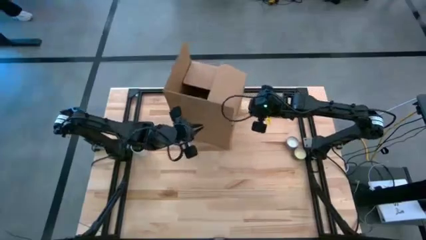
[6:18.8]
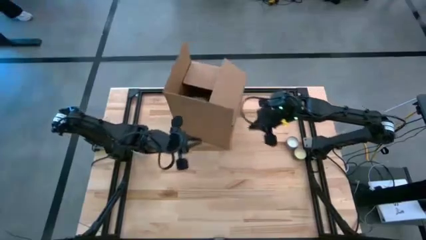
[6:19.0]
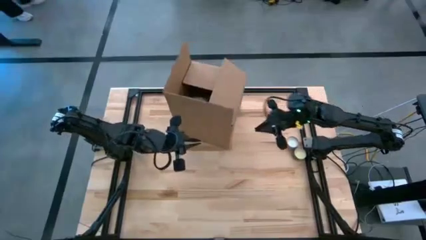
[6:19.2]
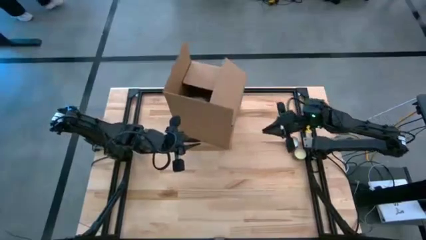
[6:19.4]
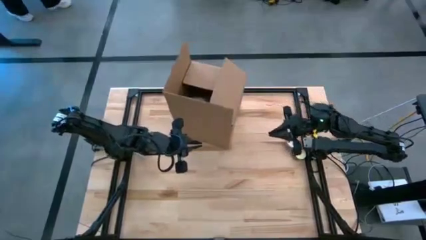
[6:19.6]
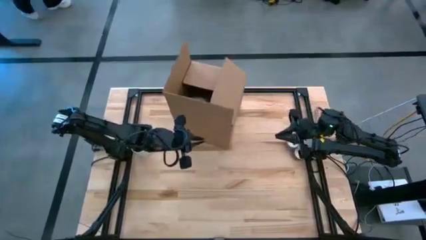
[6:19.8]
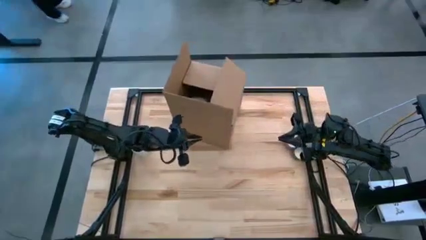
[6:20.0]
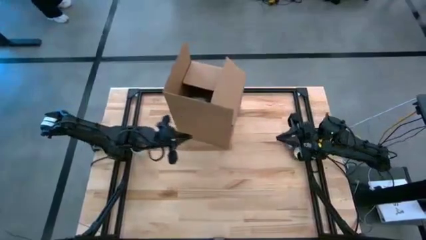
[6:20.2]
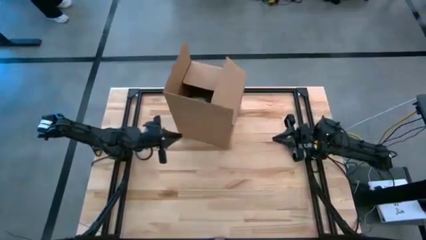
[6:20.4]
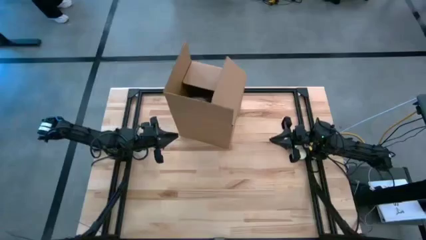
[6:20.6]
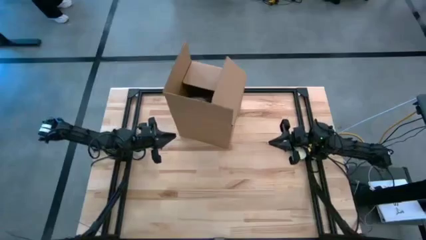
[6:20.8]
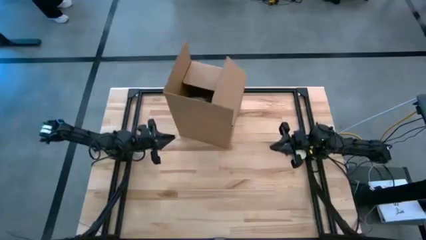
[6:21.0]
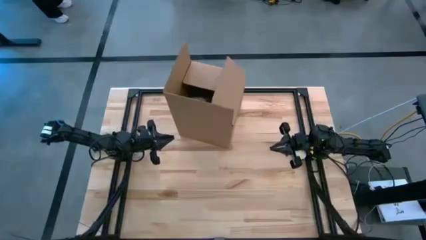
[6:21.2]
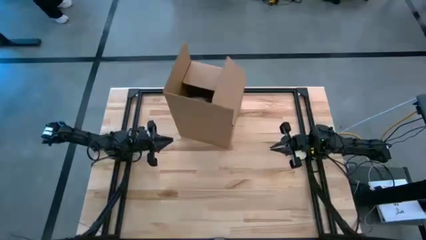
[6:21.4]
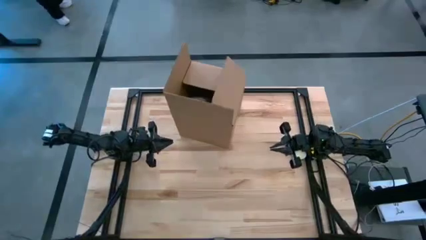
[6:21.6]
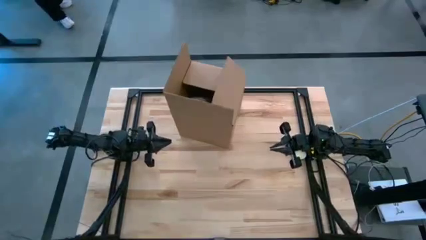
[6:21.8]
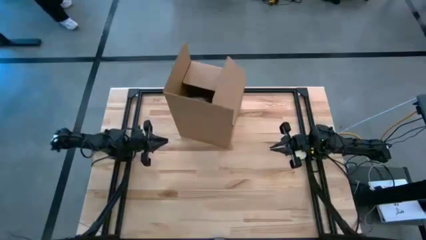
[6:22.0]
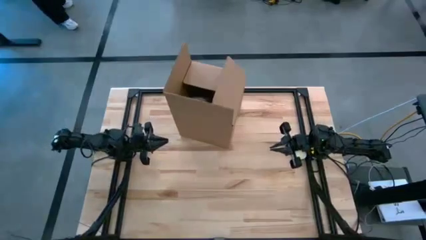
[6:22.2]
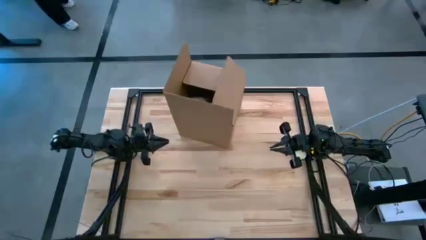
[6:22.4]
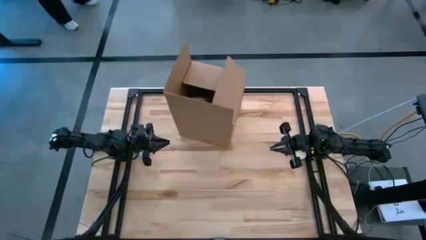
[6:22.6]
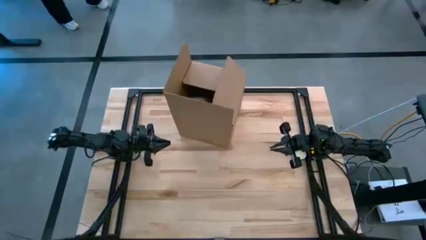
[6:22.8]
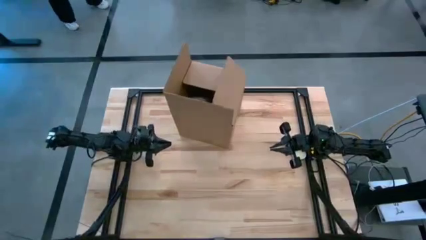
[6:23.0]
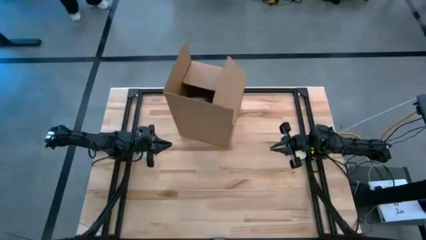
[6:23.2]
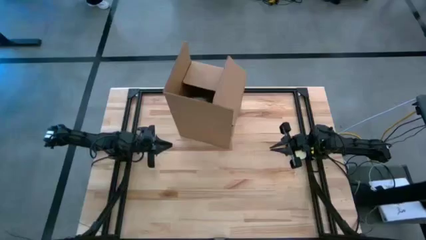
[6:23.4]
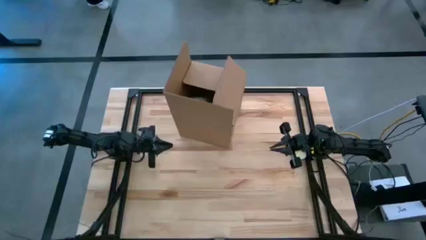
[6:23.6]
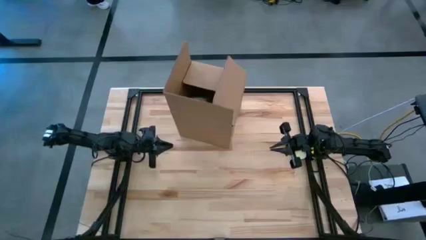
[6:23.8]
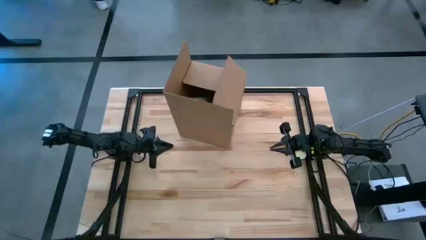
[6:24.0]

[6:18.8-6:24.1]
Task: wrap mug
Return to Home Position

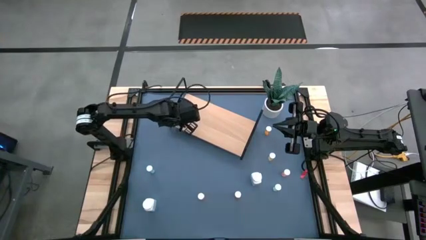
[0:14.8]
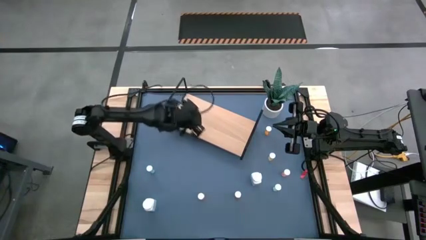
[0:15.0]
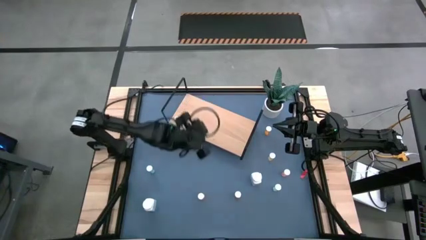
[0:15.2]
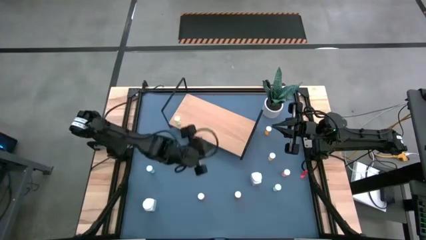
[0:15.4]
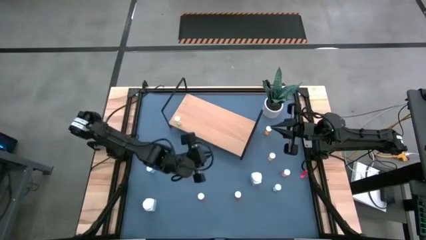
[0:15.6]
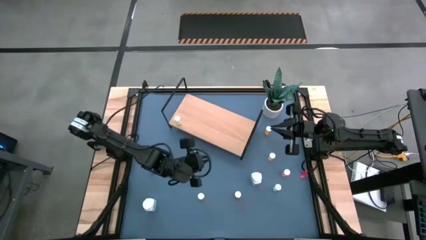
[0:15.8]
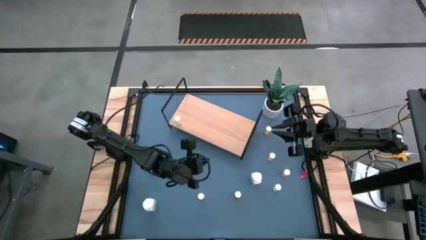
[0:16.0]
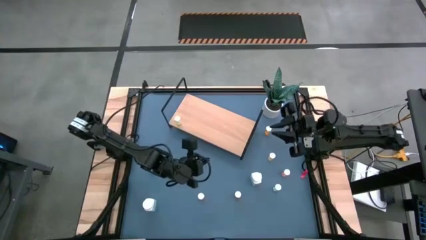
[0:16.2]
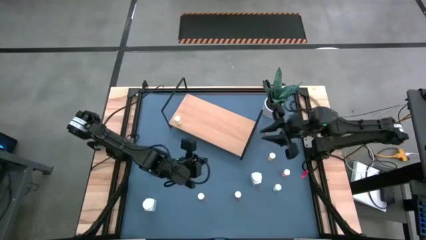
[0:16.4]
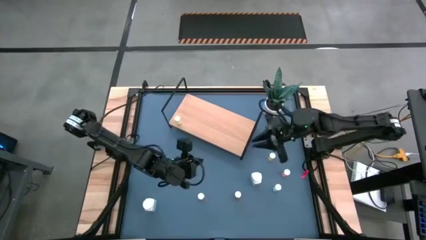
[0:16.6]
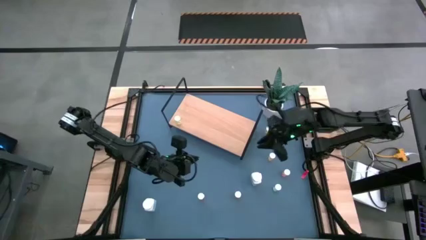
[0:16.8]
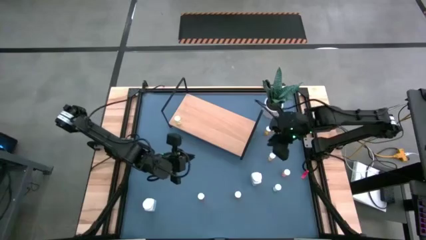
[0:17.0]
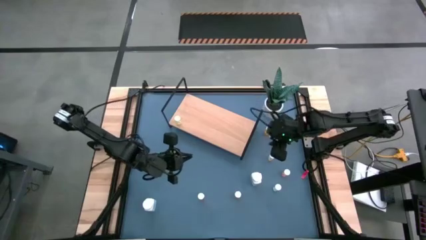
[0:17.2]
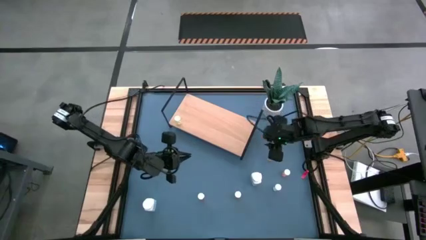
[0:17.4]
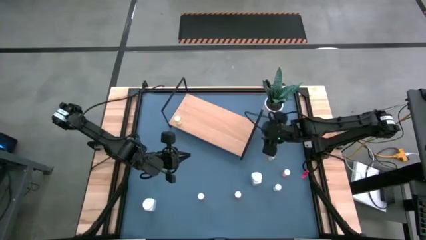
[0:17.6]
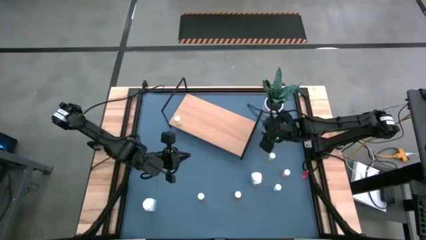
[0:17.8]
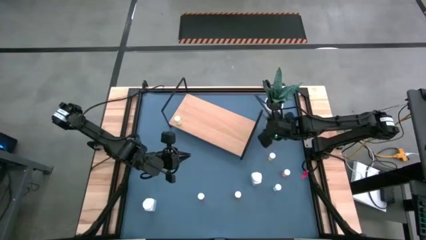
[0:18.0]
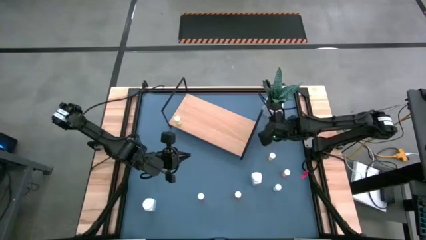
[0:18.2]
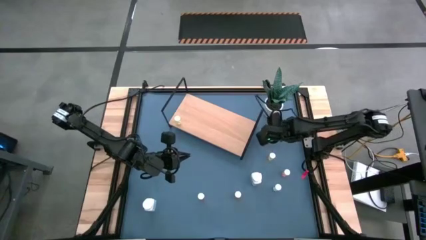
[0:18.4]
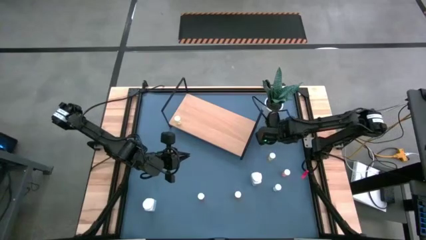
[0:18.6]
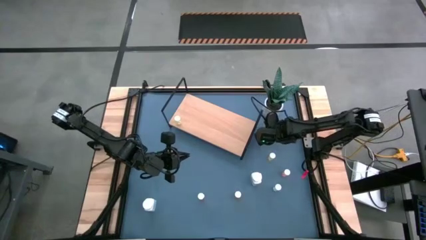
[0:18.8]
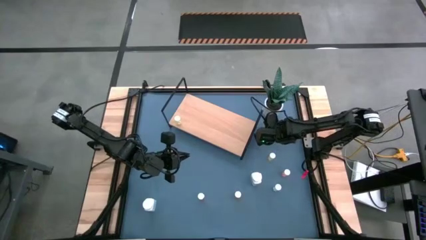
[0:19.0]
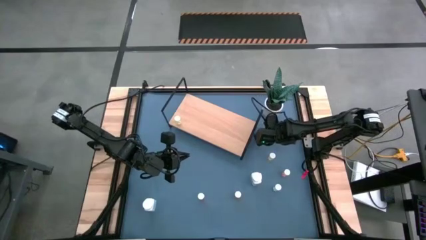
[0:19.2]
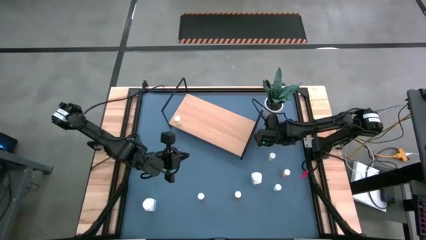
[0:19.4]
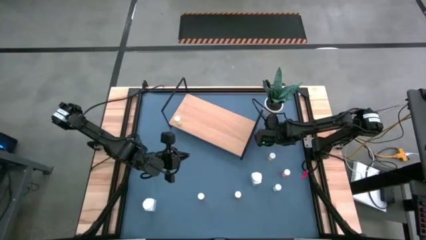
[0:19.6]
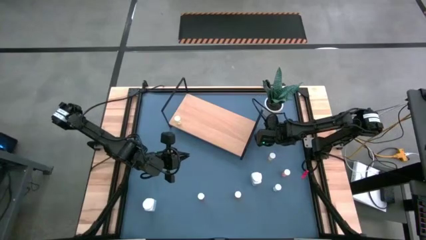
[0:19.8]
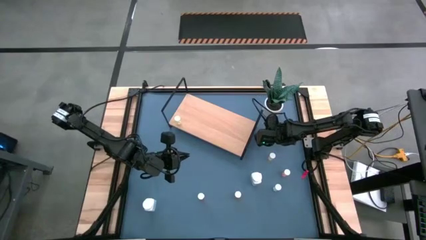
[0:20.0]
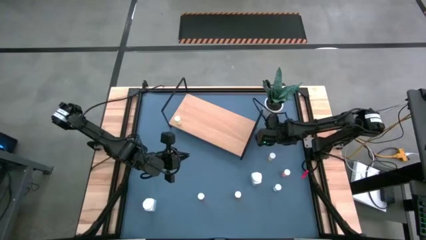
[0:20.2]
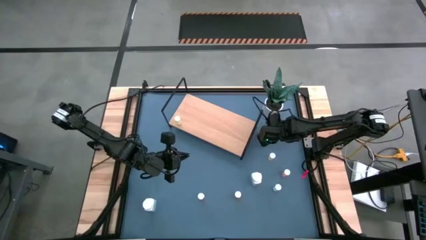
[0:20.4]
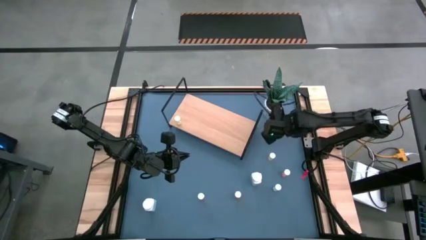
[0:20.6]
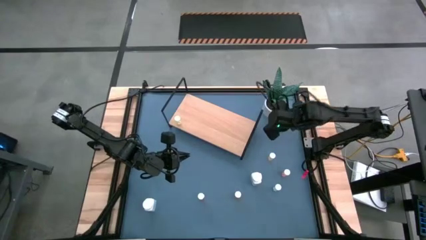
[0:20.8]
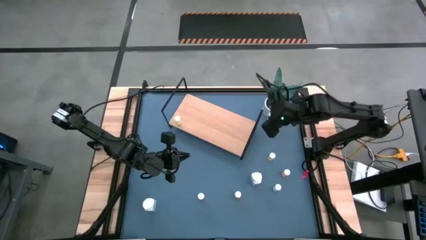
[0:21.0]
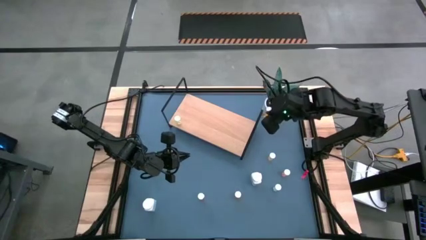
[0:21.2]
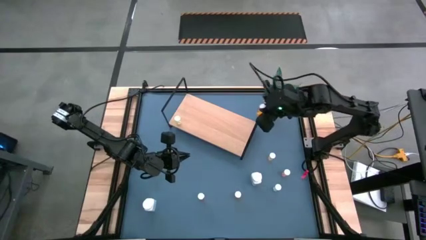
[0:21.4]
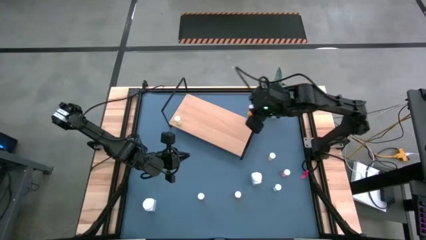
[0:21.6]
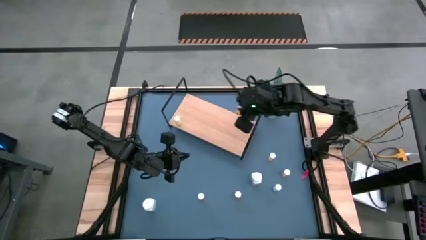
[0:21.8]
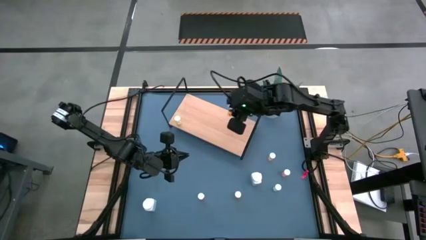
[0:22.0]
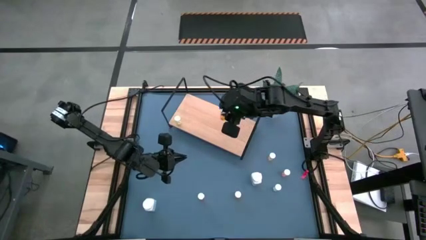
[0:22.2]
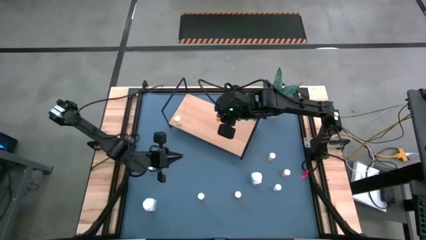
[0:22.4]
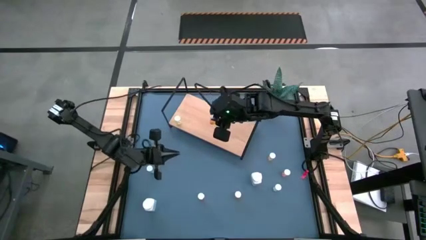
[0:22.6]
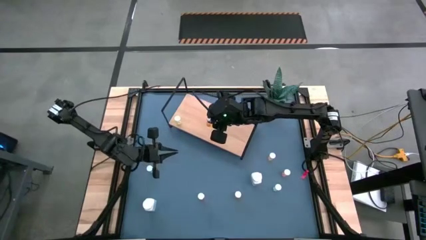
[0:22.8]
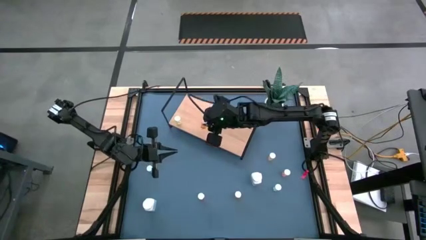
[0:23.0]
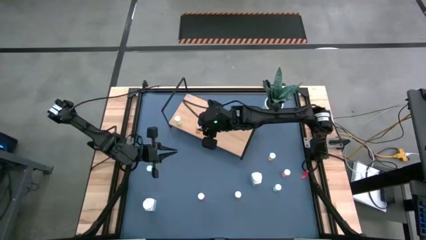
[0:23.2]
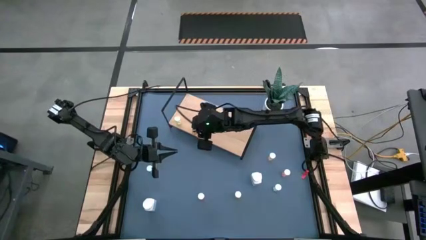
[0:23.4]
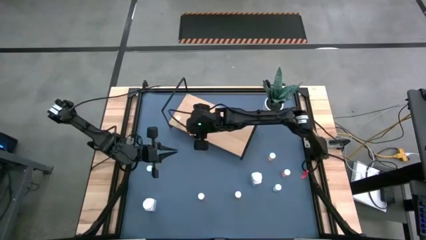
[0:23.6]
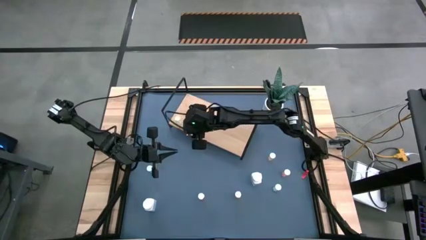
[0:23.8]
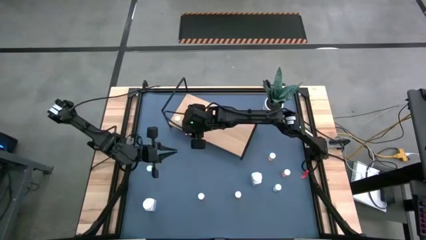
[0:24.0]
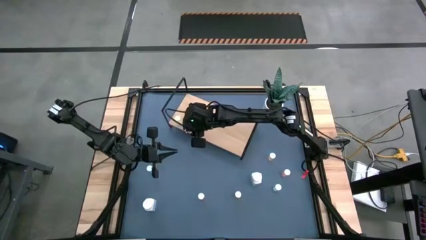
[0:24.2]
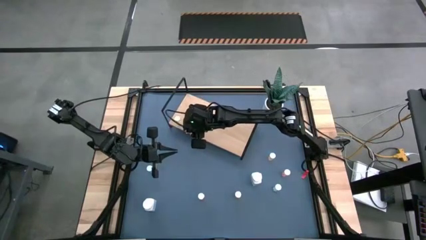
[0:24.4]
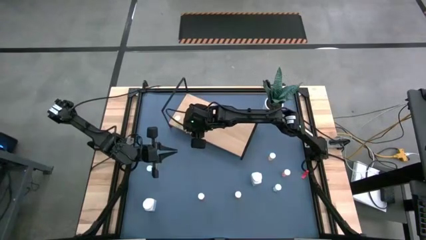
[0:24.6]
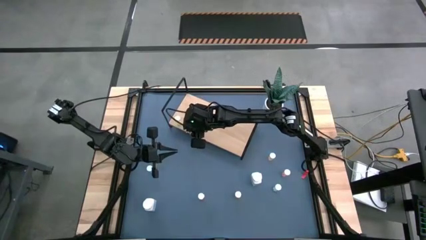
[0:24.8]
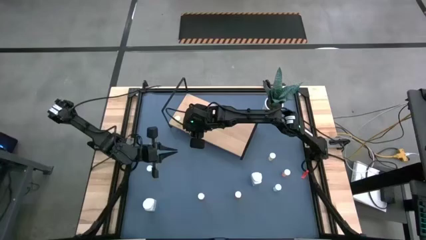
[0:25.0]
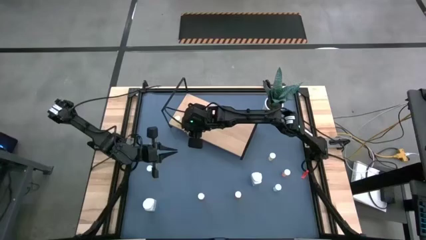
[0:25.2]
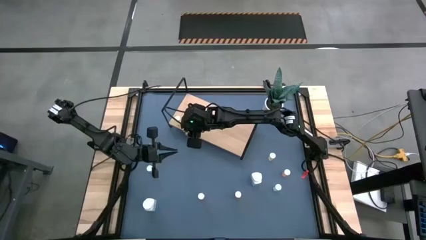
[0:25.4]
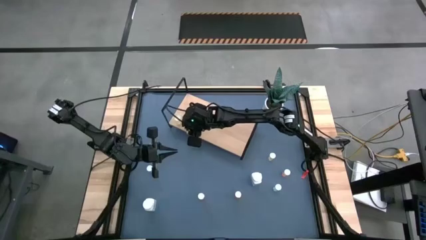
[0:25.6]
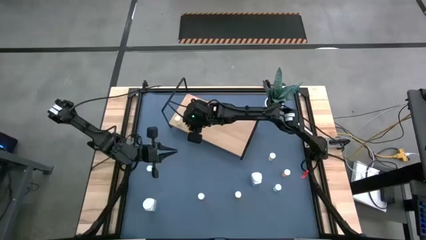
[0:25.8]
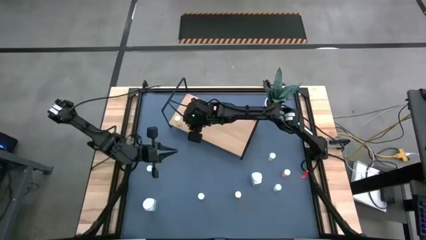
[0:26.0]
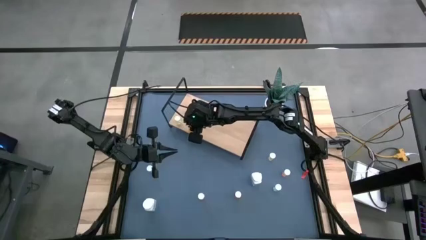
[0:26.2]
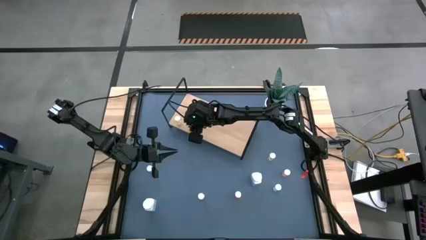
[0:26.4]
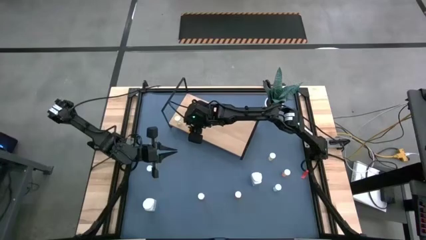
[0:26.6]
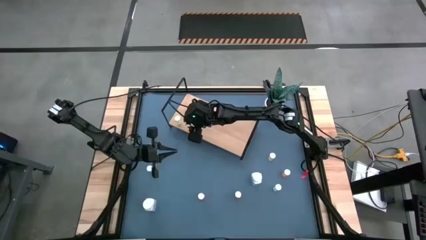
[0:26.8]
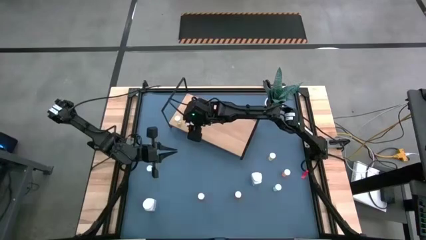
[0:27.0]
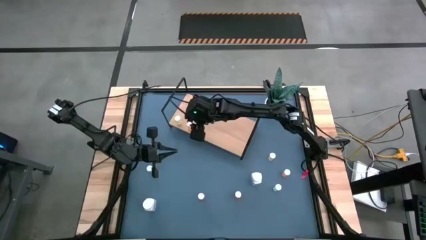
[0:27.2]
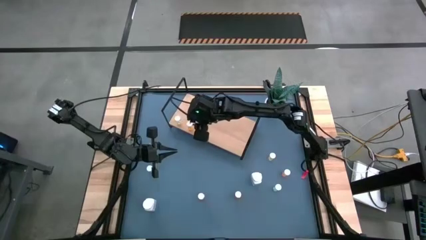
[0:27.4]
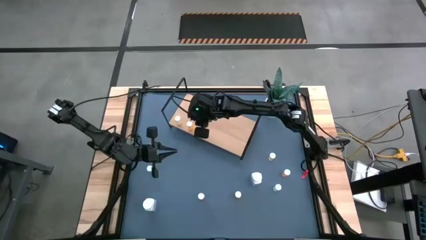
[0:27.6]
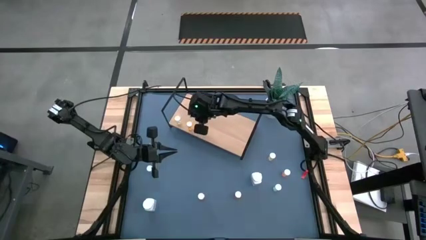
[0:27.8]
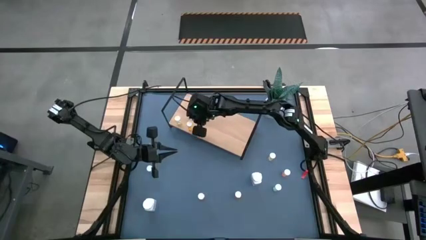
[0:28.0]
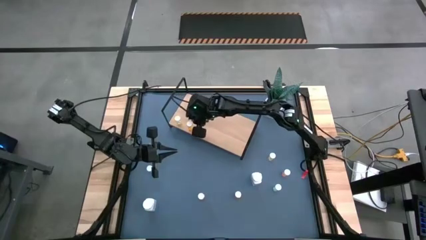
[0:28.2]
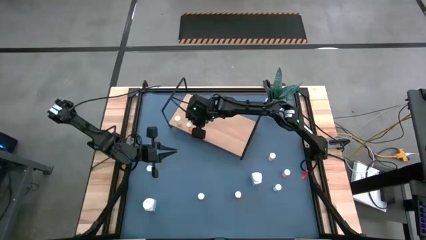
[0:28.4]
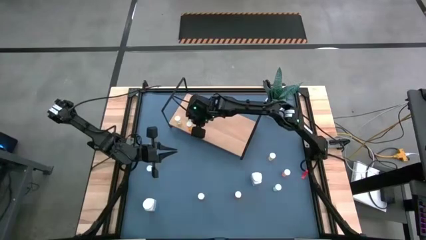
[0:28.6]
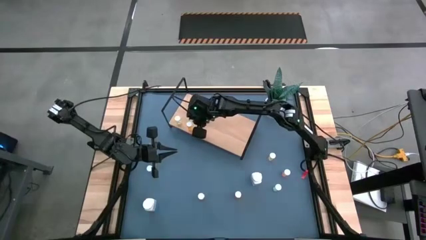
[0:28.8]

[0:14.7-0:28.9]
Task: Pick and place medicine bottles onto shelf by color
Put the top orange pill bottle on the shelf
